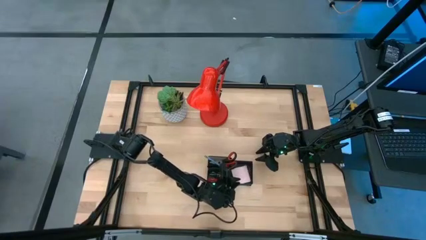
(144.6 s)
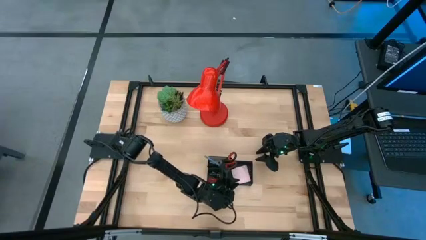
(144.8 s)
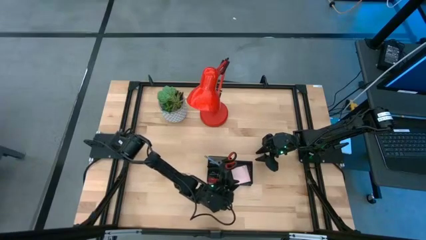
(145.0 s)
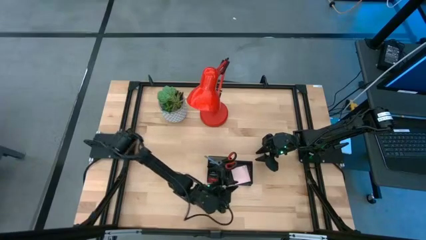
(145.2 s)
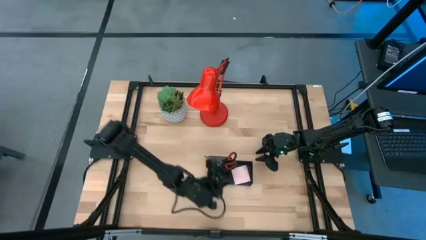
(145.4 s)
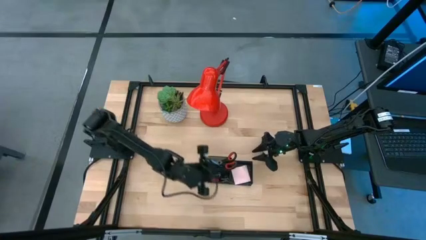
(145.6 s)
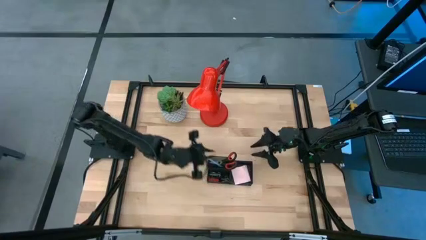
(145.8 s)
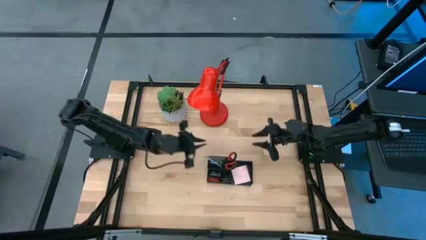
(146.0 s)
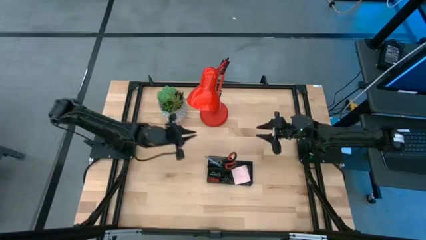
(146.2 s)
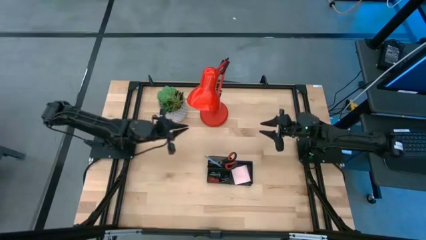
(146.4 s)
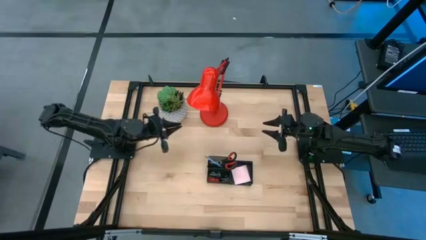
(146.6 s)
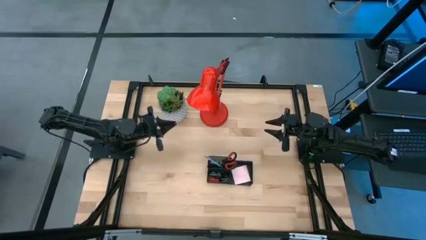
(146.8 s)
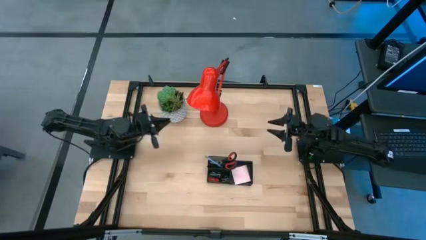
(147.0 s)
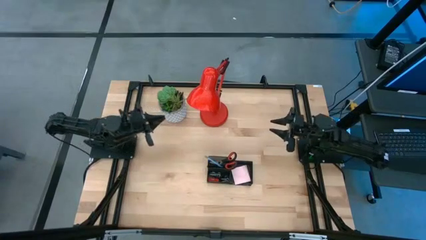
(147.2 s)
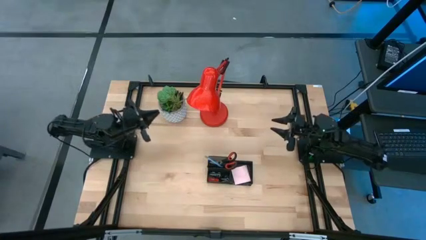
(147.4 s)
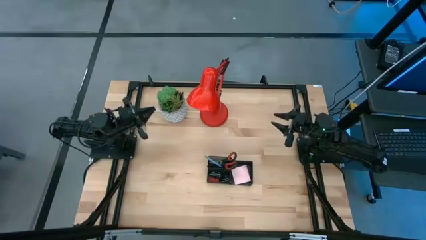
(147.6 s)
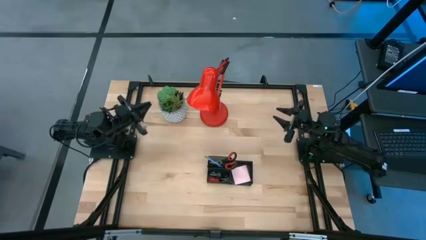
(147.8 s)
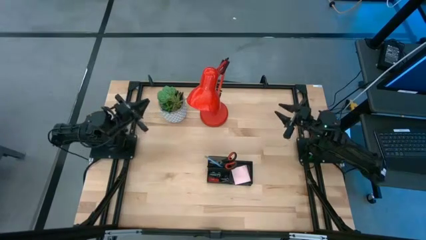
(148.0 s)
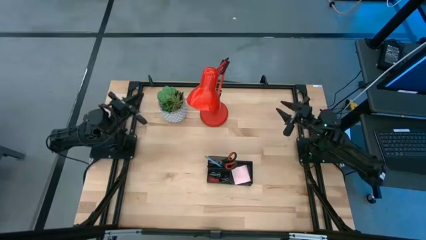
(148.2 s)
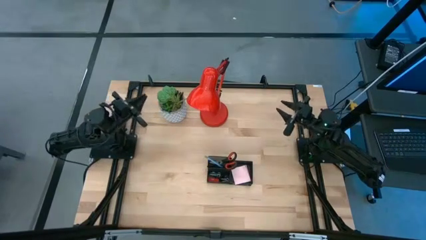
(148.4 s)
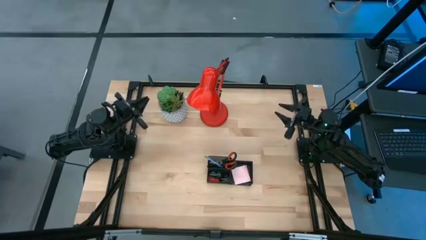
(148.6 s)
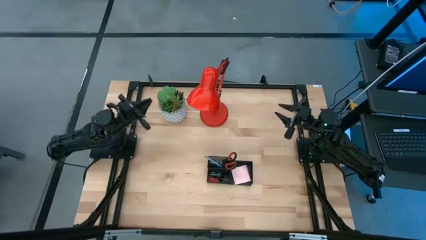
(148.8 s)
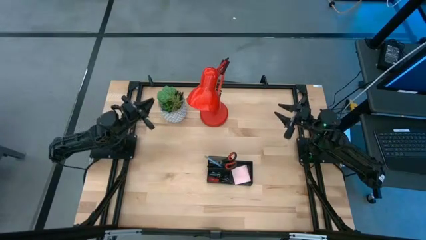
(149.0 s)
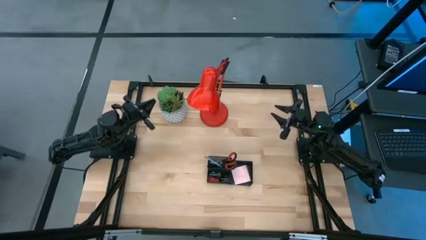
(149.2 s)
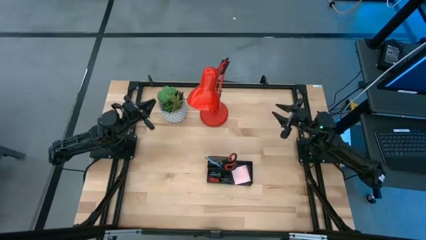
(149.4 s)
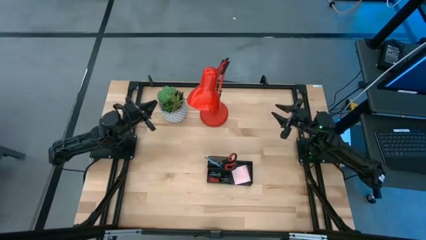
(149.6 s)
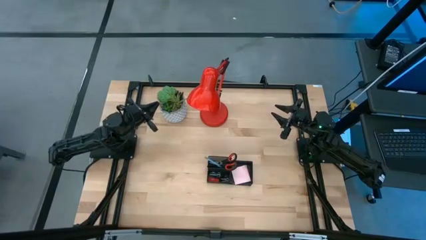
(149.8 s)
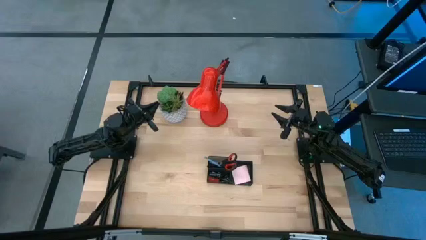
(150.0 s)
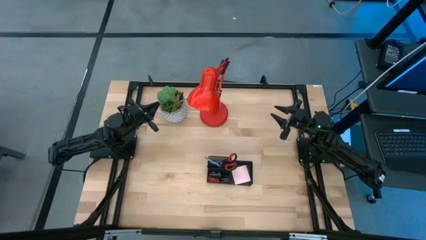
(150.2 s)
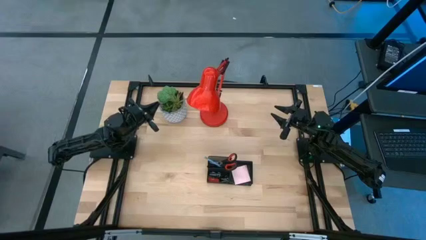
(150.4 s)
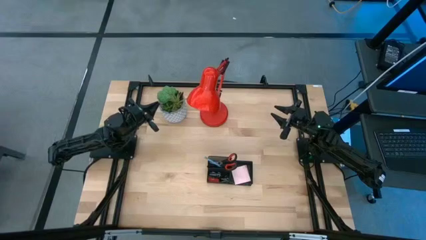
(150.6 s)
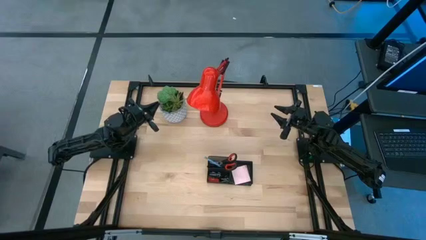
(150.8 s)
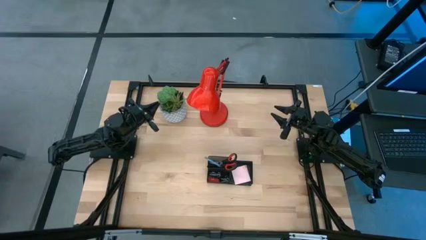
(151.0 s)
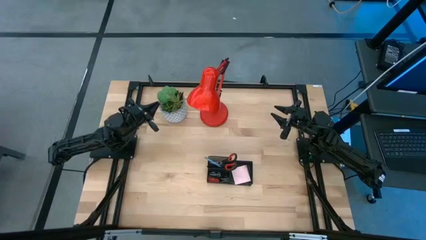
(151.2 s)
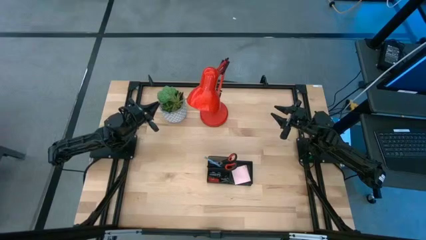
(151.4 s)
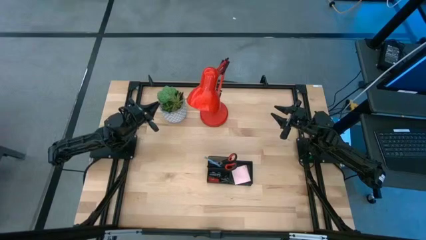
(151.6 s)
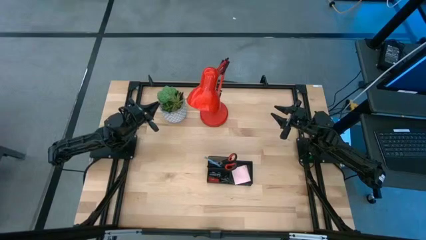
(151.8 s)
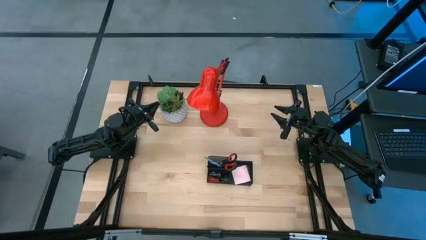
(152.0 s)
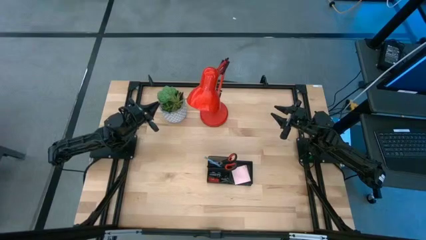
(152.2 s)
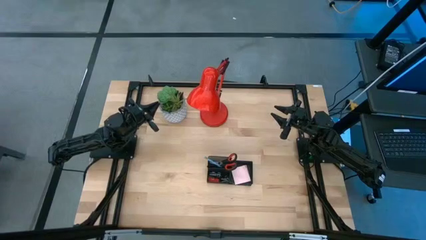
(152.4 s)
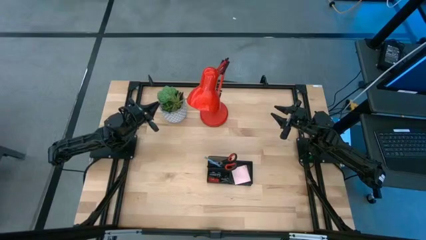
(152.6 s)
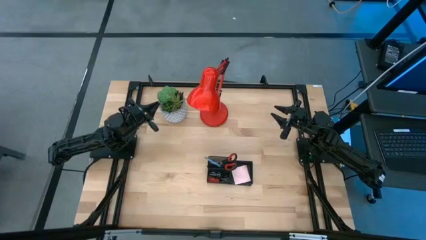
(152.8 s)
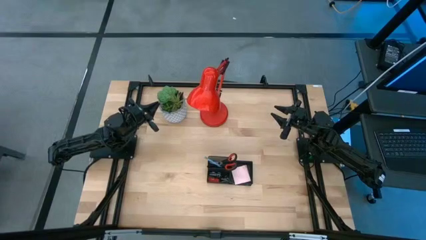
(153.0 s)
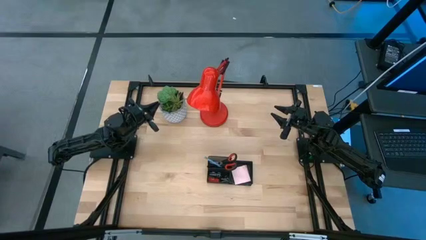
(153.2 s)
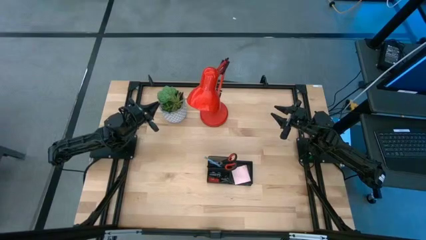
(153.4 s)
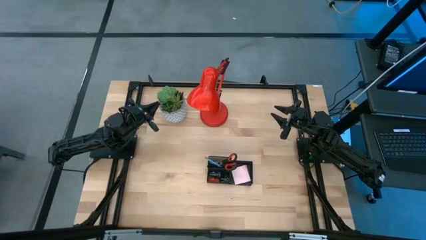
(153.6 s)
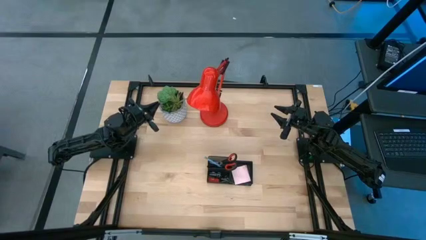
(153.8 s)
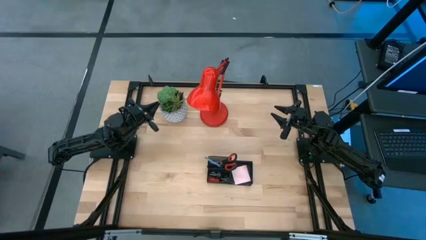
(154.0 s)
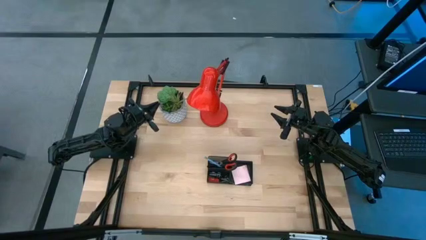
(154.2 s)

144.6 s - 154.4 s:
Task: Pick and place office supplies into organizer
Return to Home Position

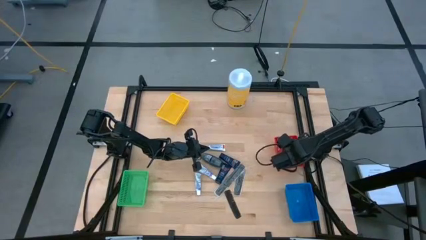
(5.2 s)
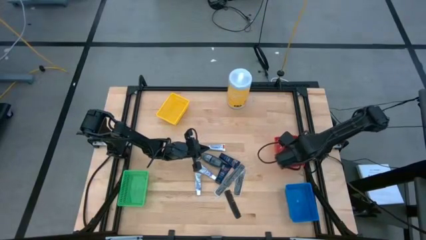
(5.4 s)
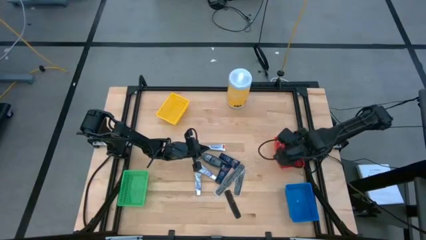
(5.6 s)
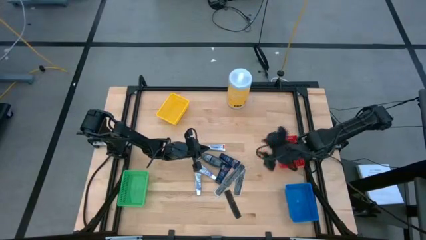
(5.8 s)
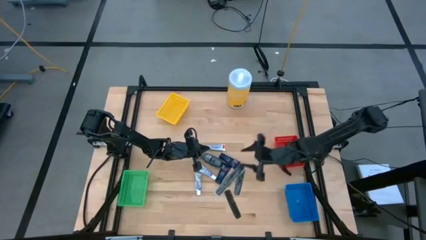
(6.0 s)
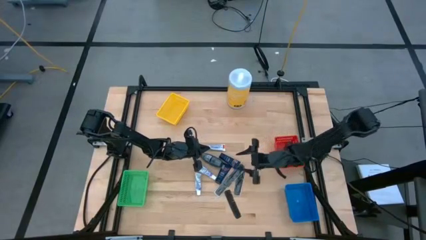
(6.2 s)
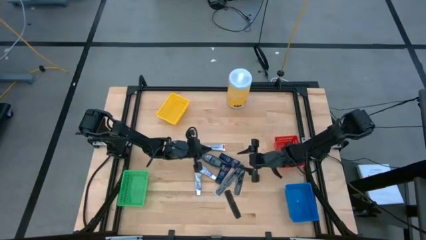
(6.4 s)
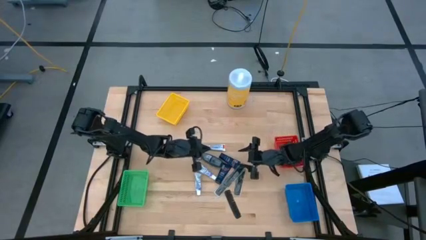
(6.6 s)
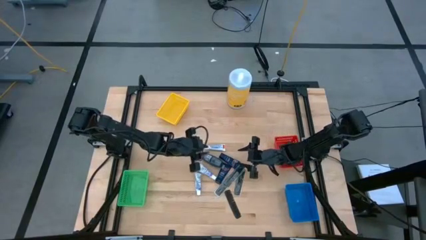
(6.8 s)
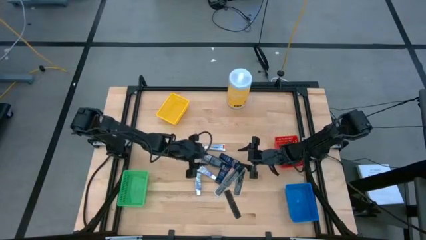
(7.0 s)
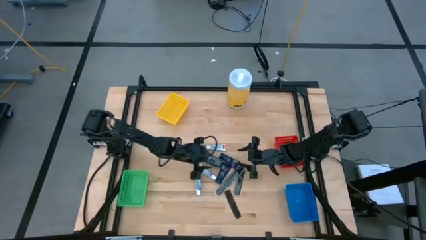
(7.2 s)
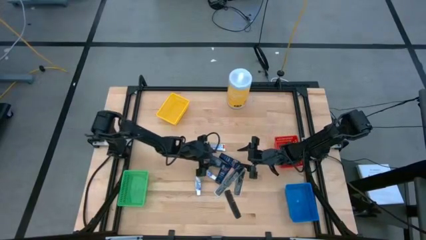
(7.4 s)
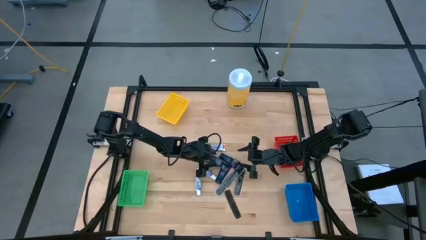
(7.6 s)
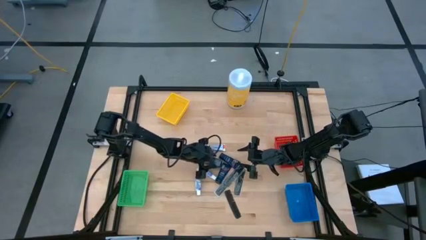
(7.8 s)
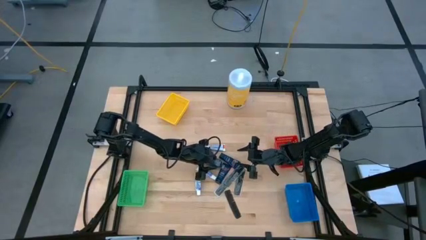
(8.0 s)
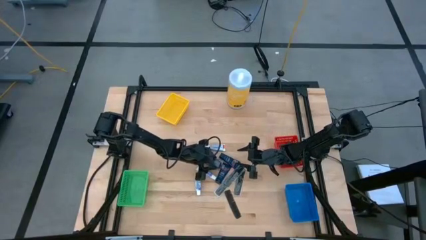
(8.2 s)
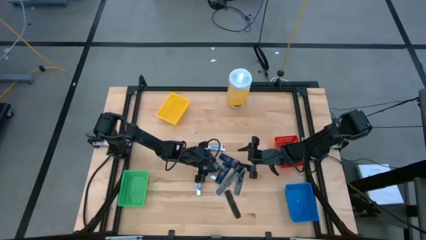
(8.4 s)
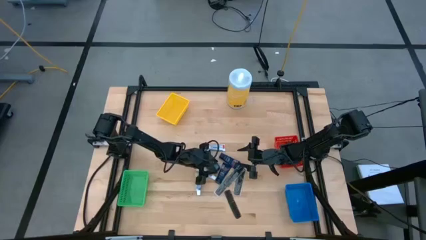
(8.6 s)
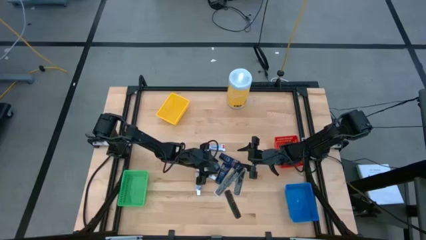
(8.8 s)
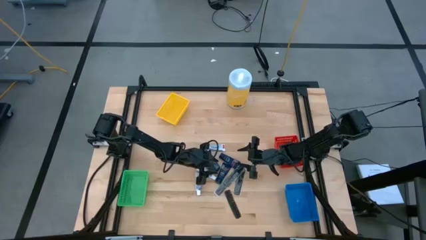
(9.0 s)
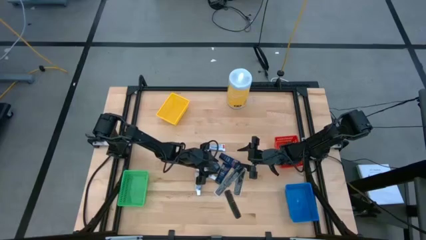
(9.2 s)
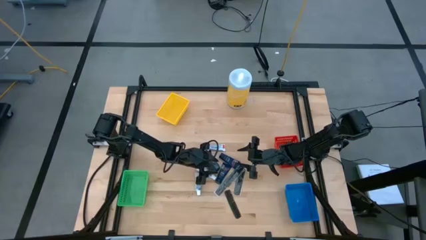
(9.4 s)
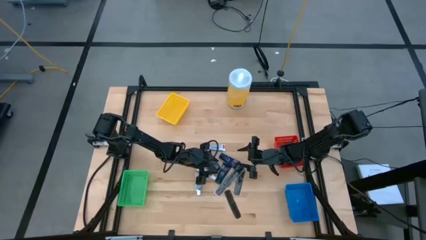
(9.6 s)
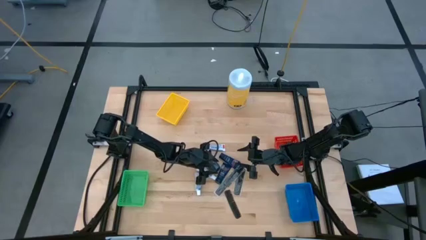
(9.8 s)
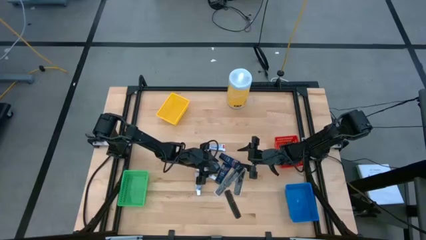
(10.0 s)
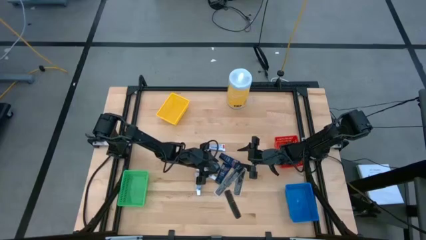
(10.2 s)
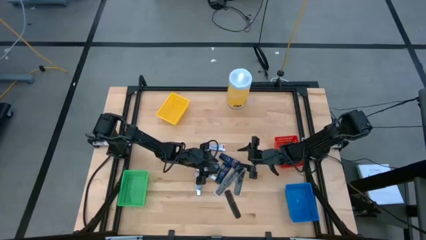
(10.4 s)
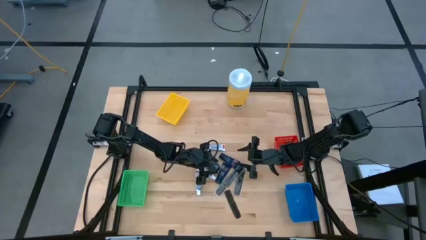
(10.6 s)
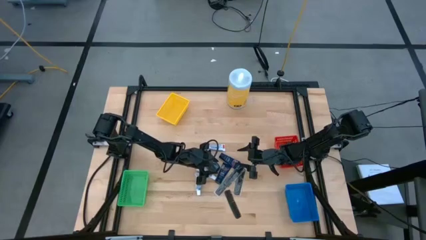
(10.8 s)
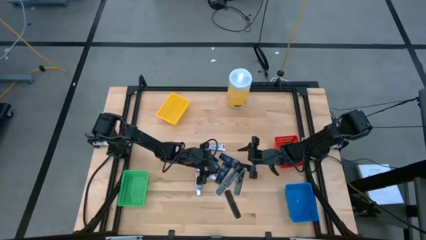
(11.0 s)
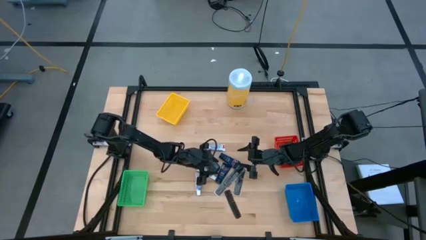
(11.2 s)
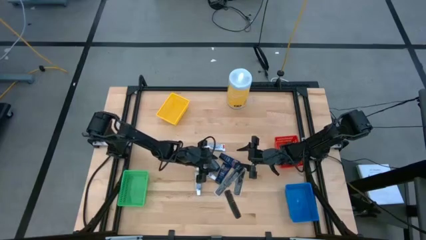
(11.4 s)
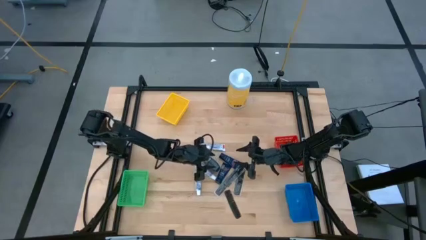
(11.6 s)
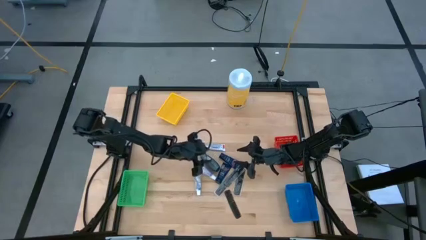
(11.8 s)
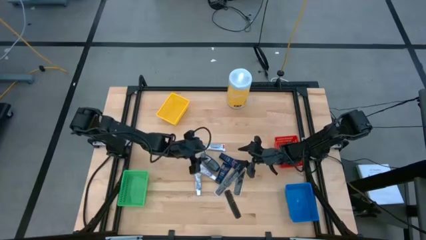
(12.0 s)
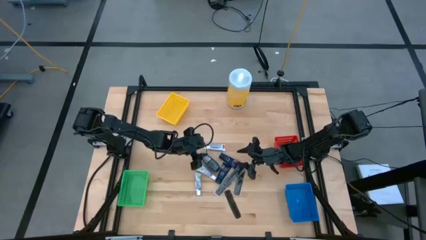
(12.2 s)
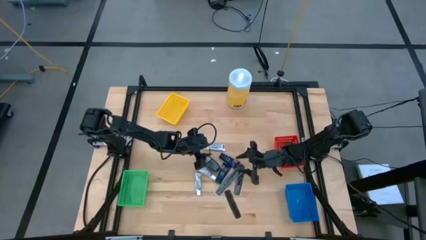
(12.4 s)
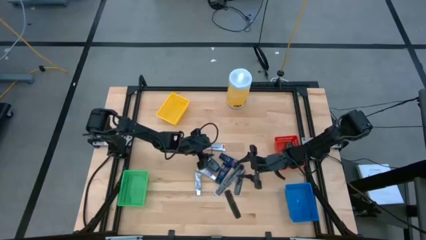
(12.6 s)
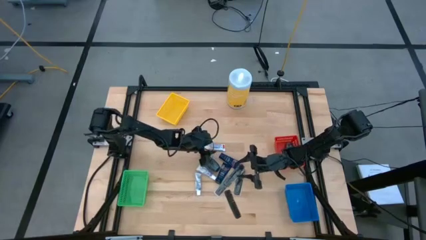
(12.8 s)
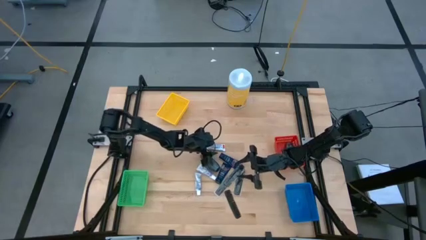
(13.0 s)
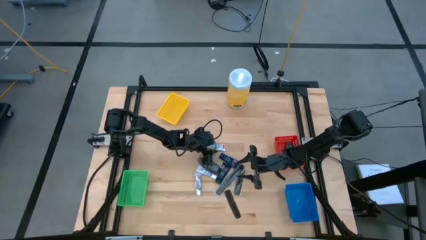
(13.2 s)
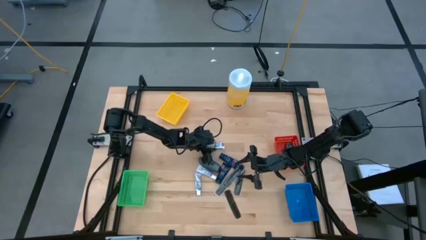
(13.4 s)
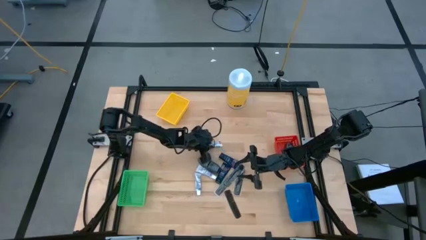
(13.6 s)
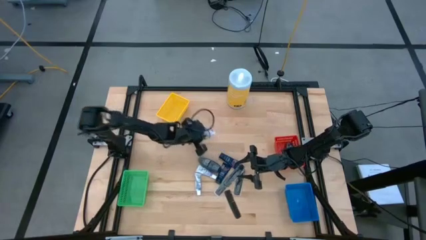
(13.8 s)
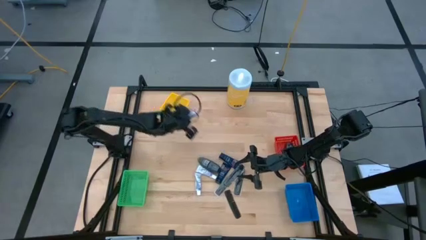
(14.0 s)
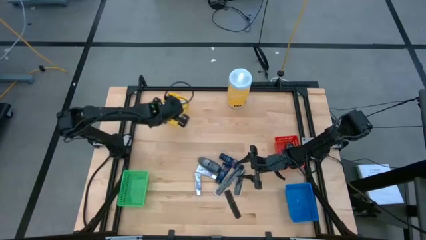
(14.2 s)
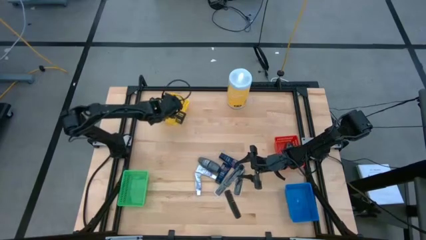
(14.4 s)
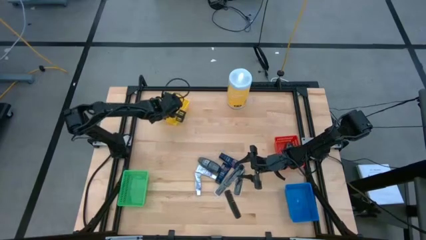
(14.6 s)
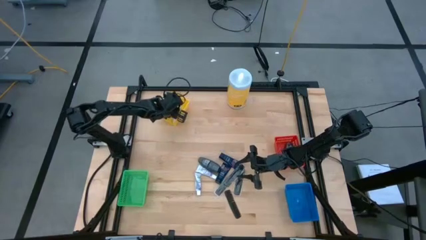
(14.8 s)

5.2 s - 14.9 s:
Task: Pick & Place Travel size toiletries
Put the toothpaste into the yellow bin
